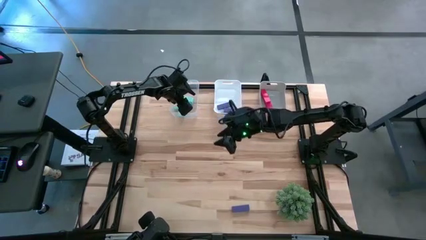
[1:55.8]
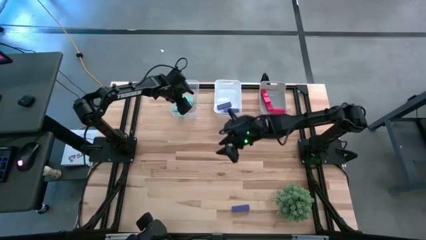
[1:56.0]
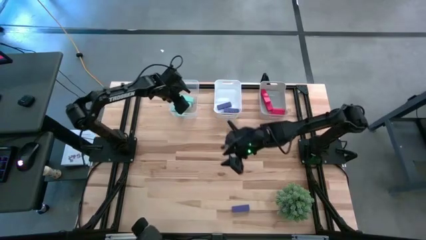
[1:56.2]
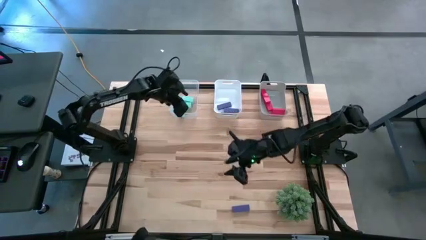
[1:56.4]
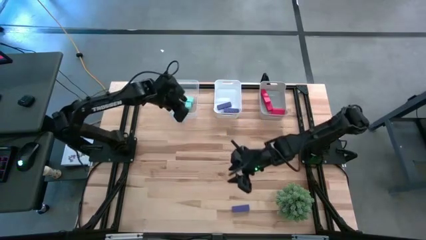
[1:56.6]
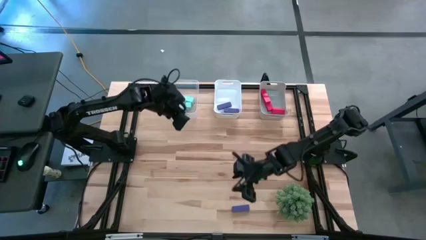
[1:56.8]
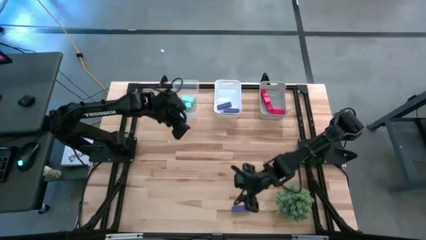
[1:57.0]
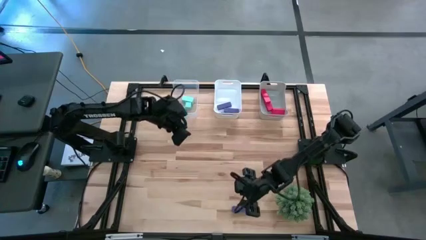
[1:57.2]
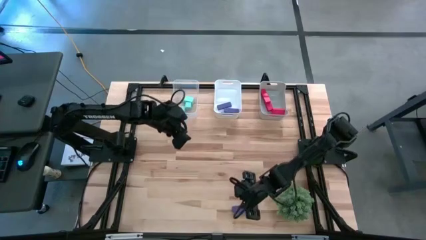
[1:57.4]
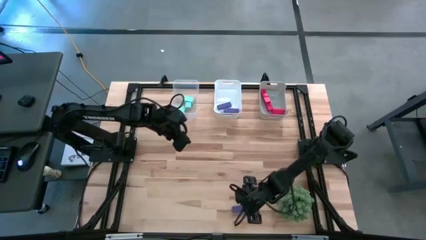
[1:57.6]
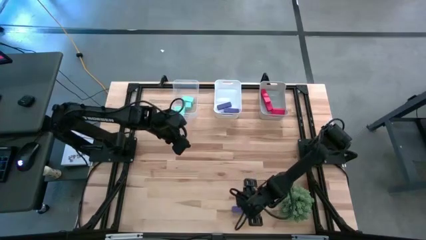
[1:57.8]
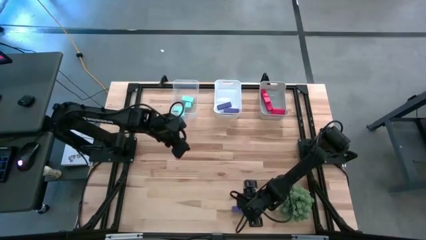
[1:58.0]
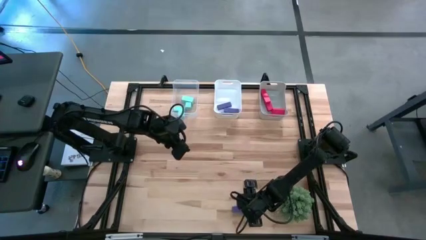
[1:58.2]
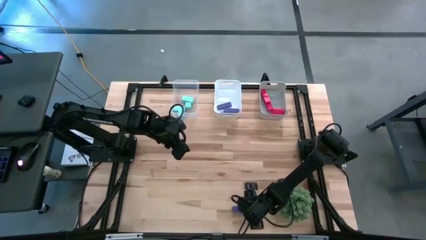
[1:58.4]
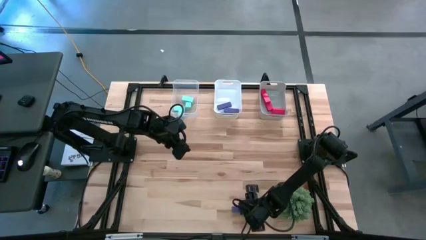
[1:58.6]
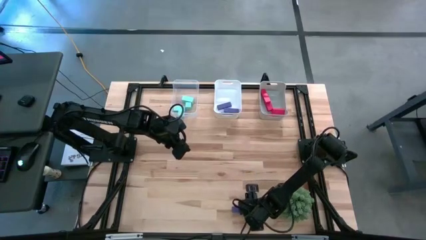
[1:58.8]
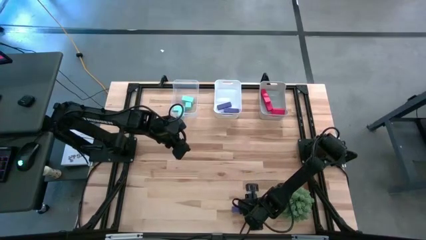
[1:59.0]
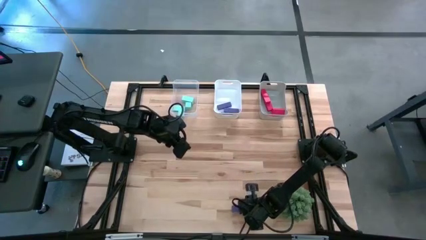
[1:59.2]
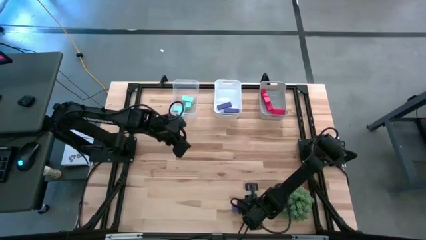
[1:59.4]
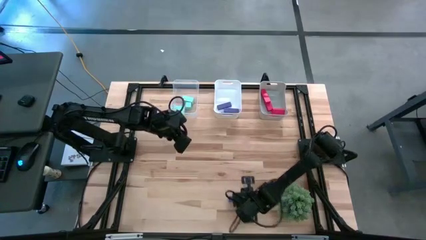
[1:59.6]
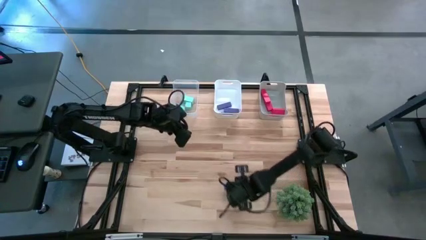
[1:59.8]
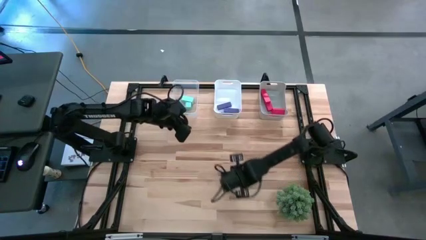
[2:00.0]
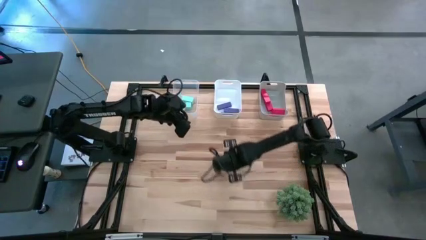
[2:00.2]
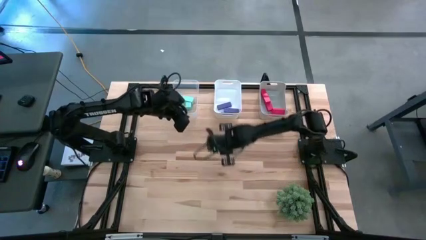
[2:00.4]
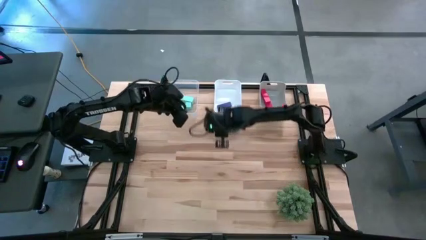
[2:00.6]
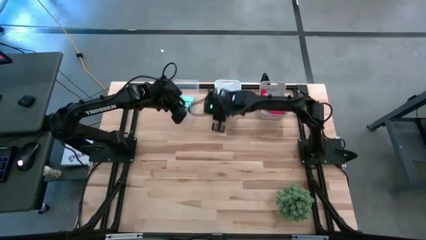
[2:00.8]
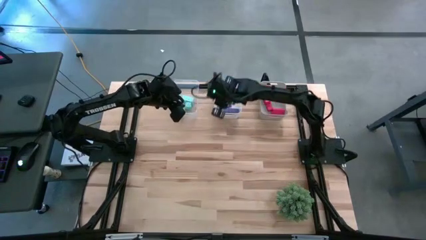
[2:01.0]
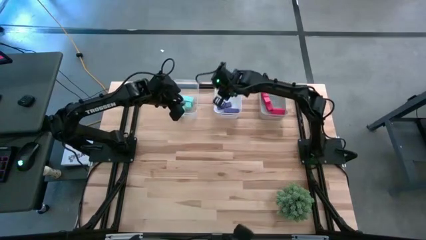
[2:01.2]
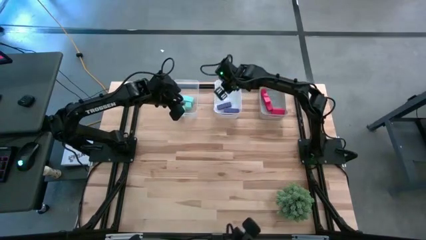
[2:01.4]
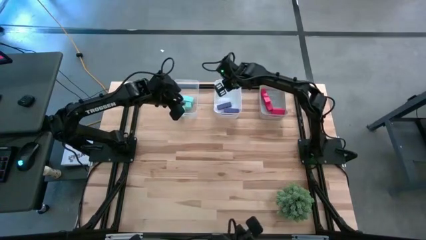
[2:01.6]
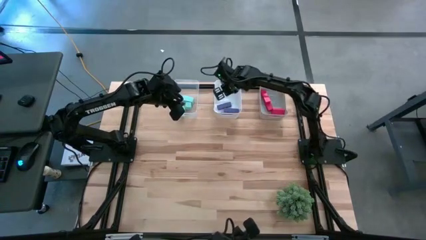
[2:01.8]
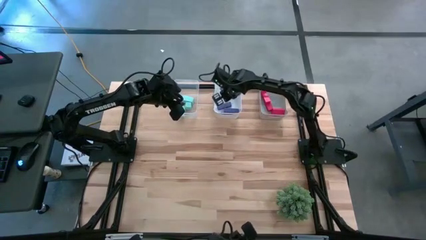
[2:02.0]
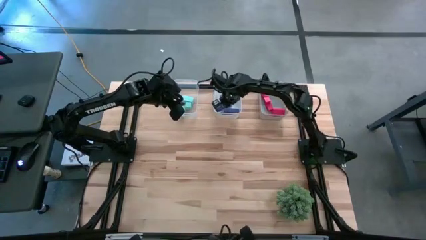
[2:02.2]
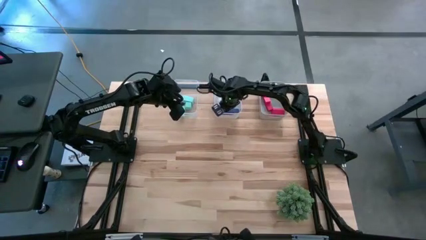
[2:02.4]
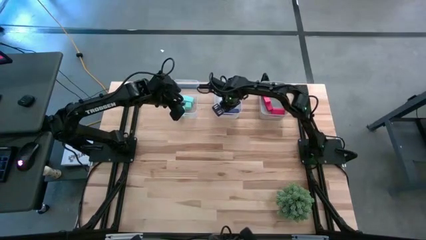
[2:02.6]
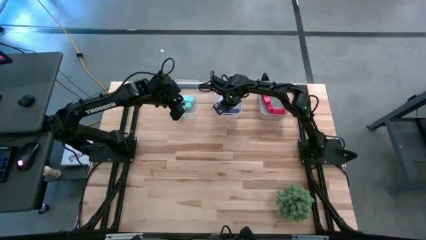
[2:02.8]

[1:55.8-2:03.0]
Task: Sort & place blocks by color
Put the violet block into the white bin

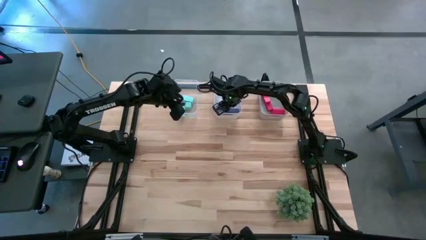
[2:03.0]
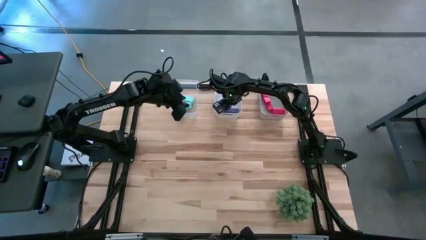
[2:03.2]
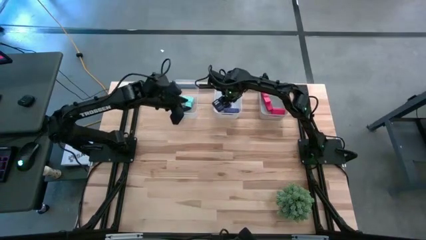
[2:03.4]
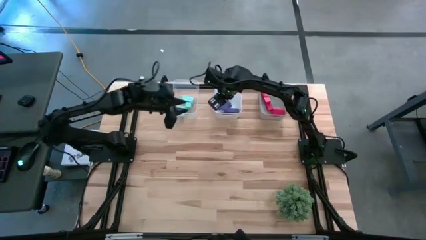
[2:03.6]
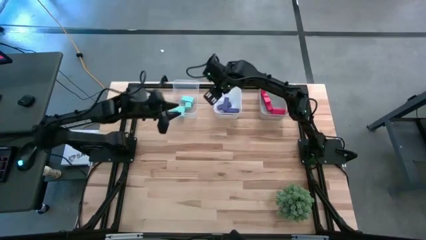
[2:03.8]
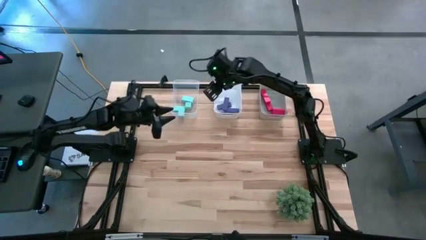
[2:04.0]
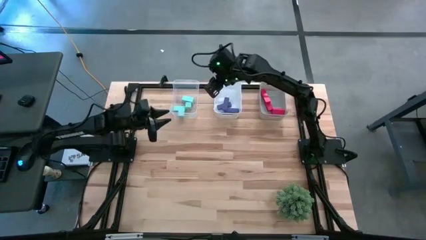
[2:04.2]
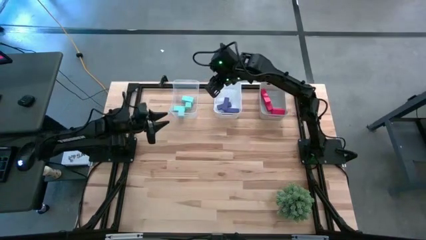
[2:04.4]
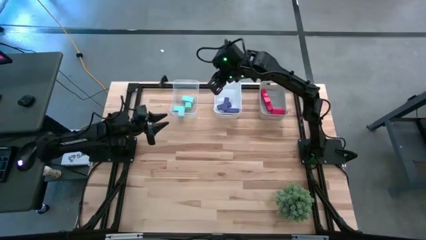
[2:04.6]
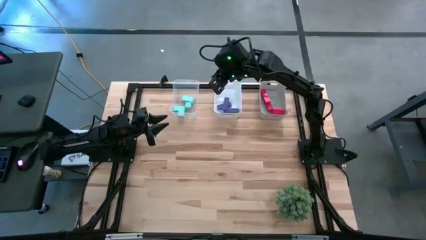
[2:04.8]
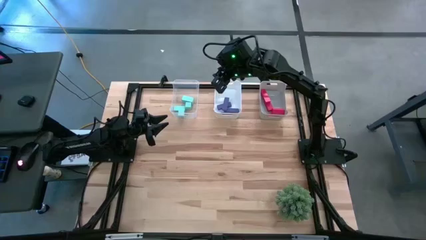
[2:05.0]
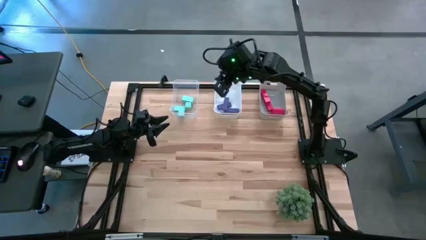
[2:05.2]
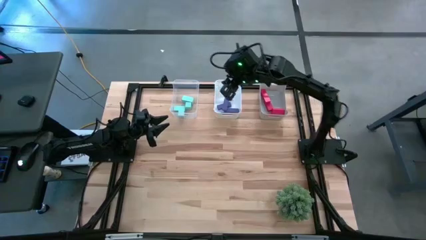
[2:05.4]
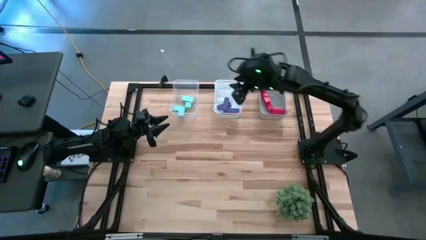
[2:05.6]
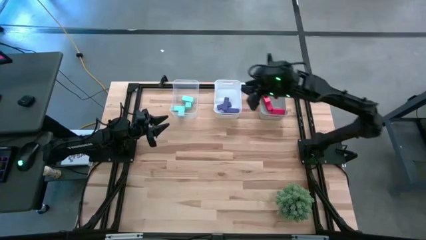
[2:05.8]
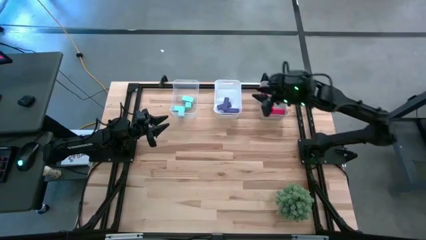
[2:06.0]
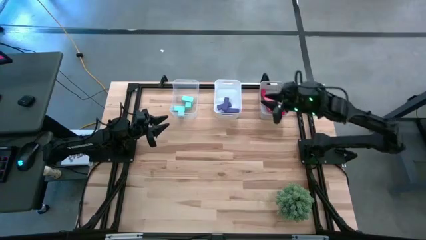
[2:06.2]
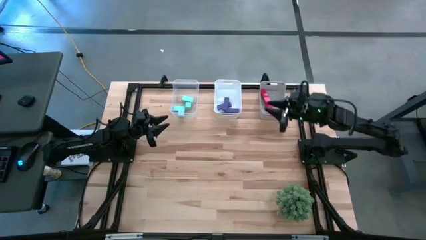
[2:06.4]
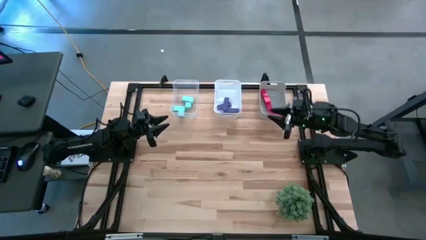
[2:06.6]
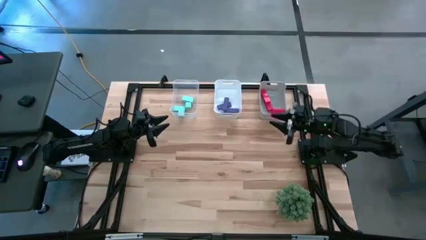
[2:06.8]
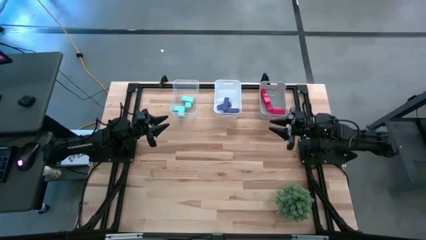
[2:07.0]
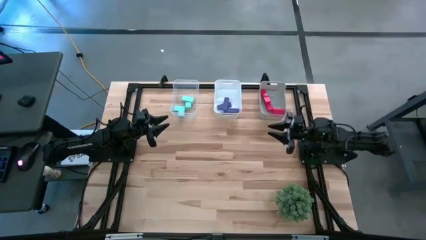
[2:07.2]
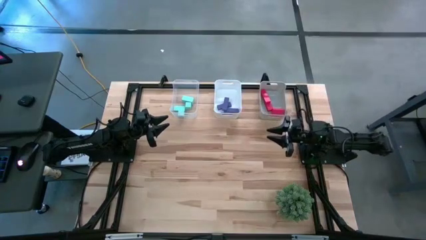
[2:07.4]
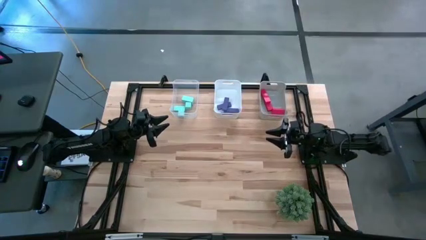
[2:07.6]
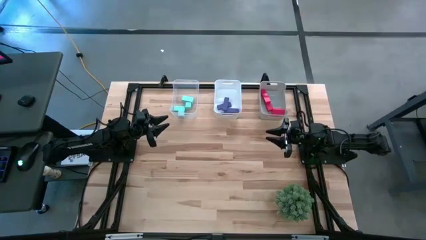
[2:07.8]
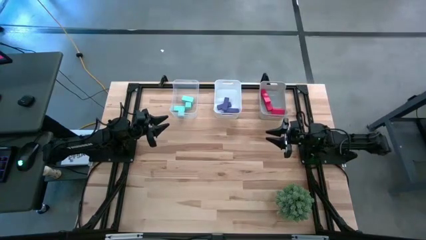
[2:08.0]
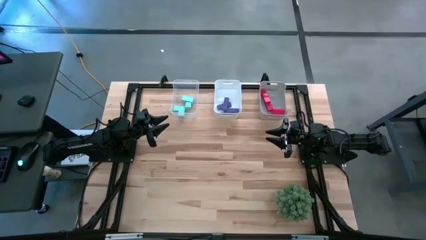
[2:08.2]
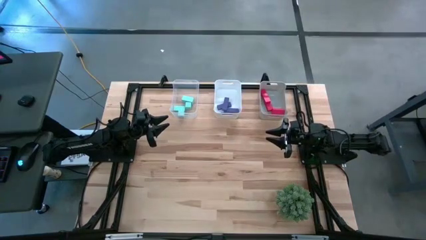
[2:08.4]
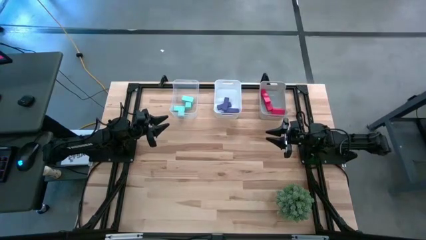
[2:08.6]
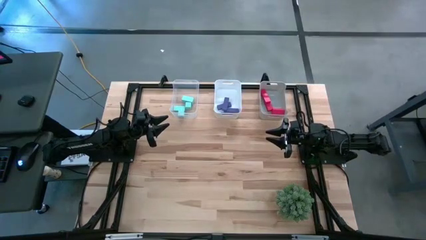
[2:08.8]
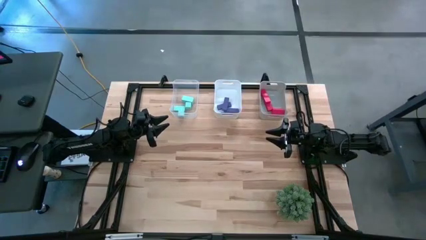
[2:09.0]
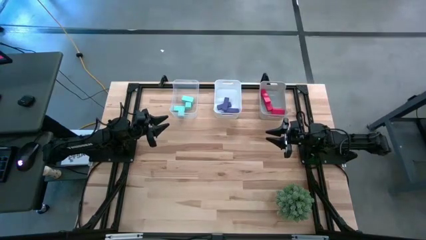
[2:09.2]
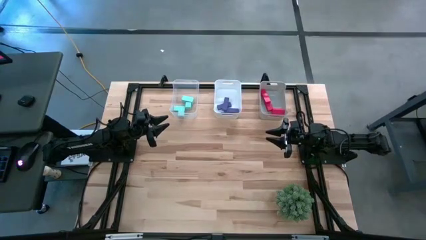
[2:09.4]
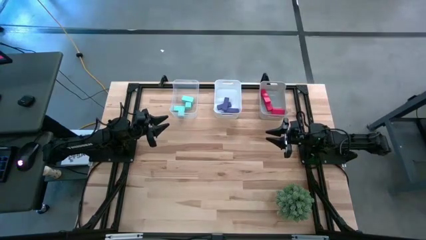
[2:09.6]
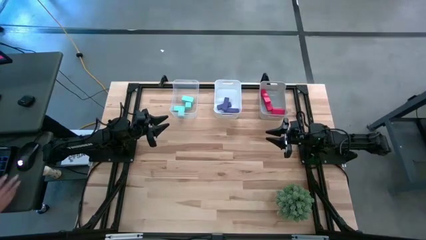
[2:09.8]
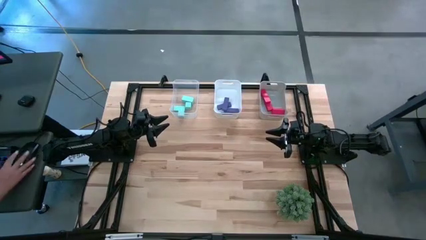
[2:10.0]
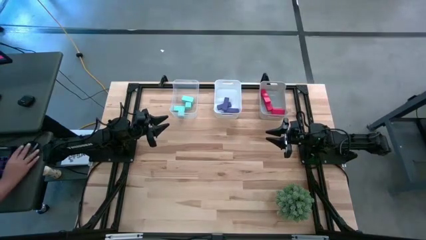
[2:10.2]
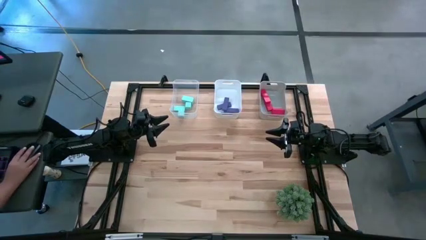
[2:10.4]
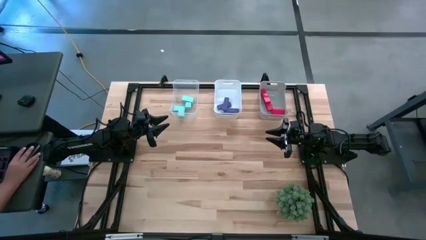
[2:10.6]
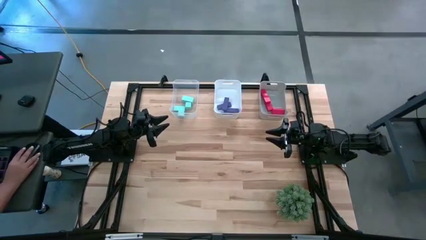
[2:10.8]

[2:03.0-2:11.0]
Return to Home Position

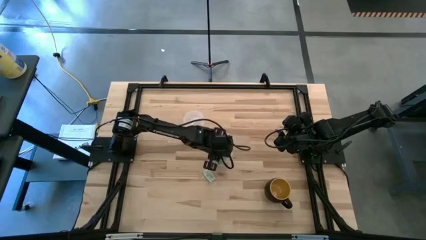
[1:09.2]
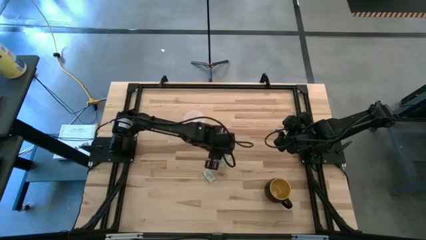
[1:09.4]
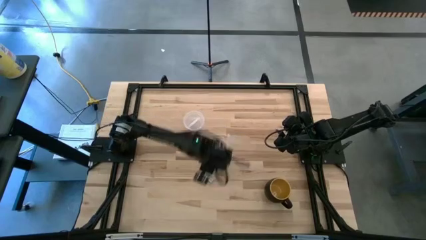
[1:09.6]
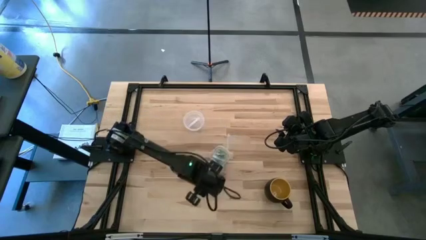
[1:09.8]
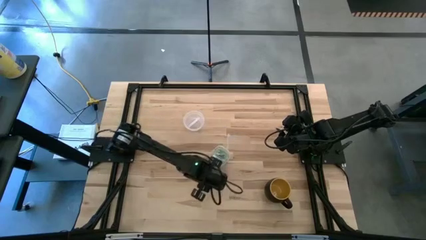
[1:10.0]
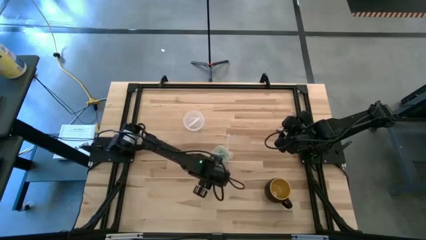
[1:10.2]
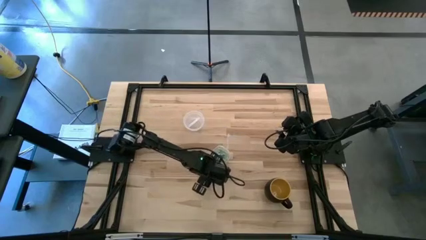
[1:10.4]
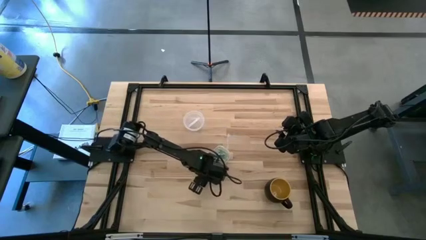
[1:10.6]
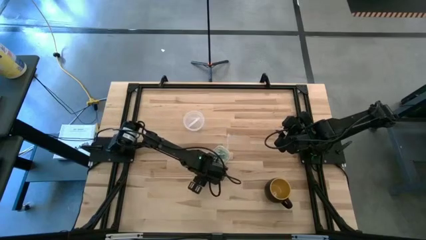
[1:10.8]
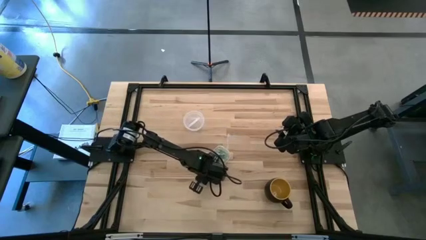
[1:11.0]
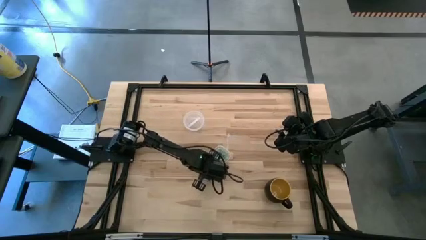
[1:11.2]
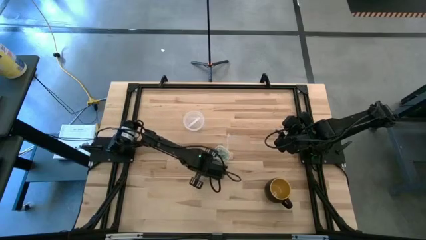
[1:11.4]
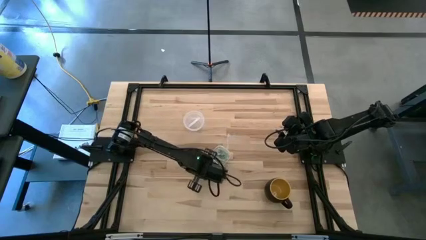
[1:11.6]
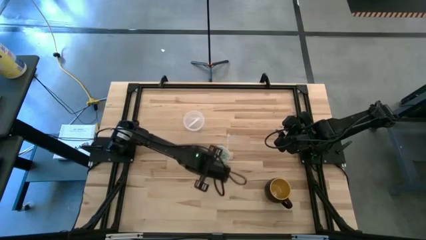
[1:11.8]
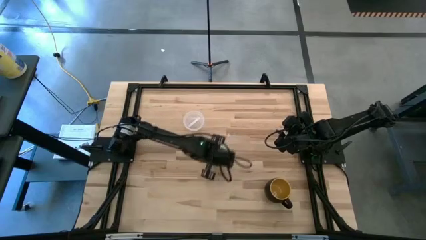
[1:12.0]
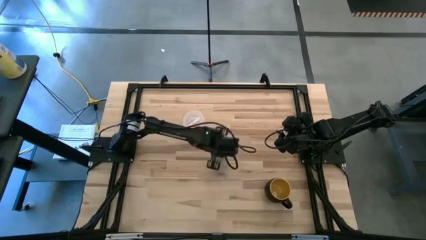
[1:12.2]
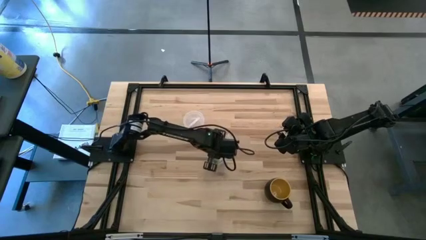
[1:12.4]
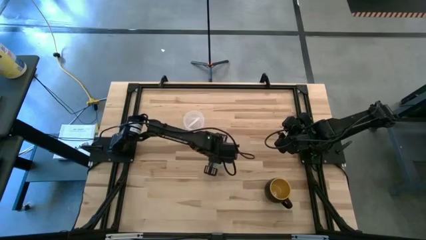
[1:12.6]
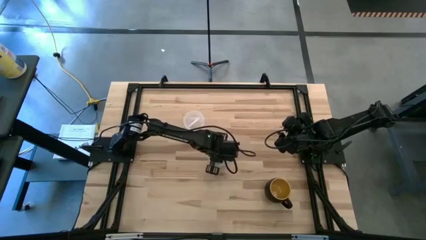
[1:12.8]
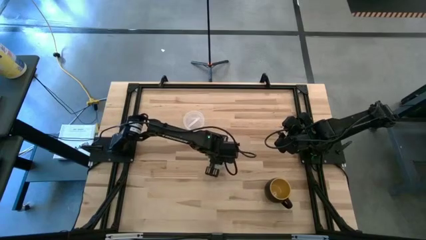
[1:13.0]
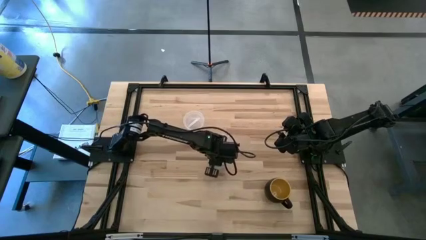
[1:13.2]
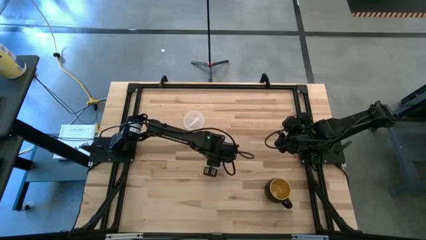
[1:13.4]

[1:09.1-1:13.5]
Task: Pick and place items into bin
Put the light green stevia packet into the transparent bin
